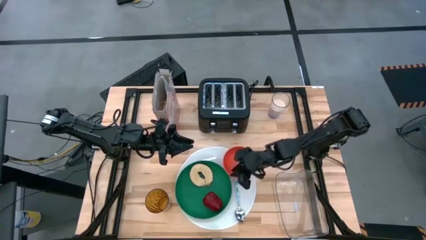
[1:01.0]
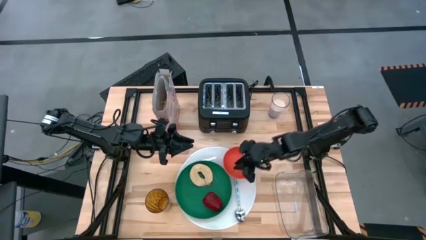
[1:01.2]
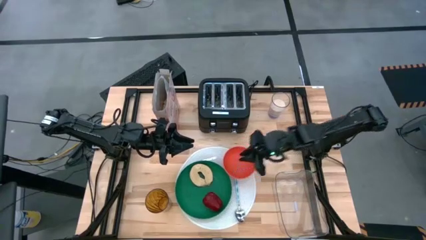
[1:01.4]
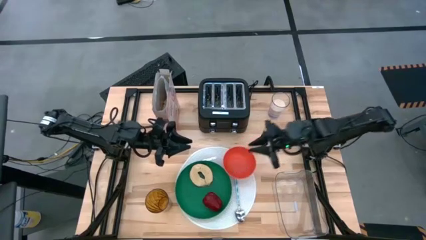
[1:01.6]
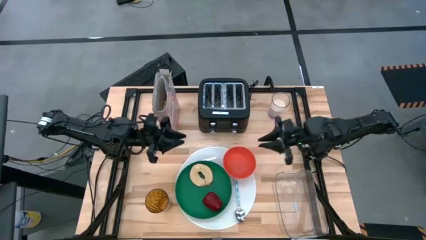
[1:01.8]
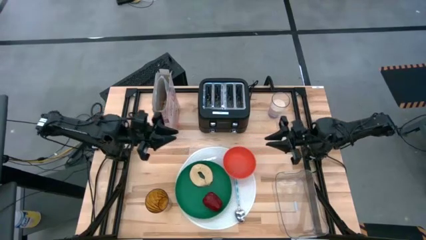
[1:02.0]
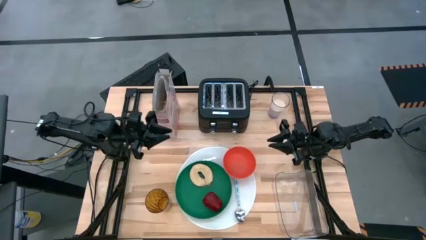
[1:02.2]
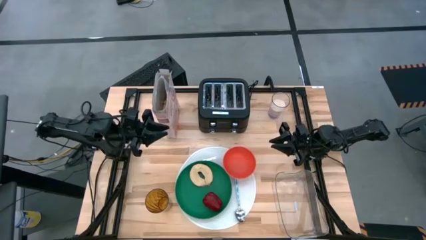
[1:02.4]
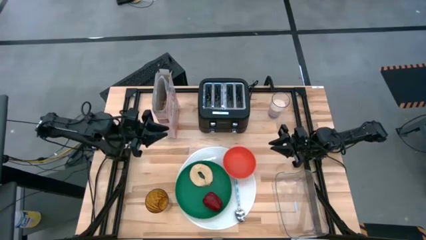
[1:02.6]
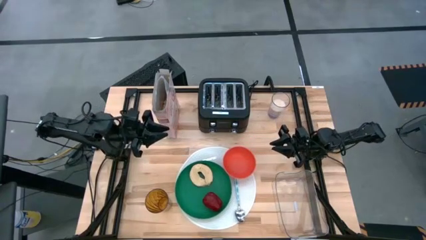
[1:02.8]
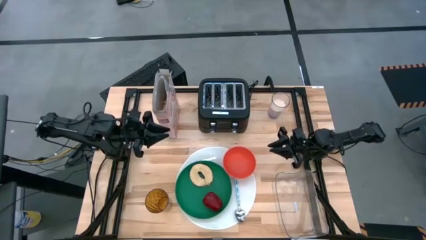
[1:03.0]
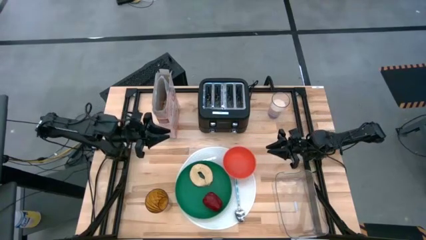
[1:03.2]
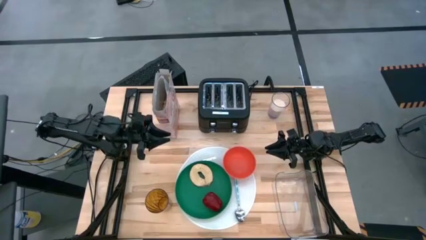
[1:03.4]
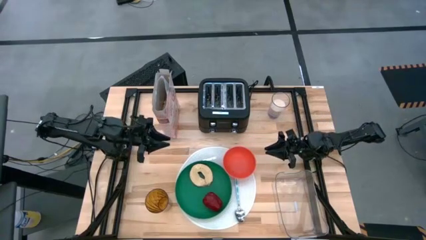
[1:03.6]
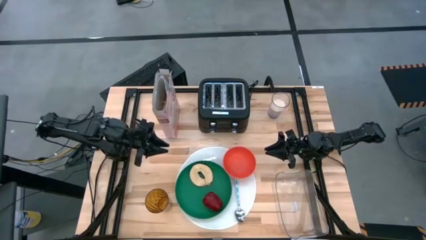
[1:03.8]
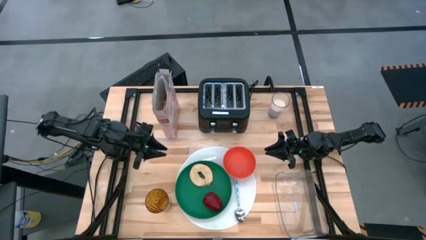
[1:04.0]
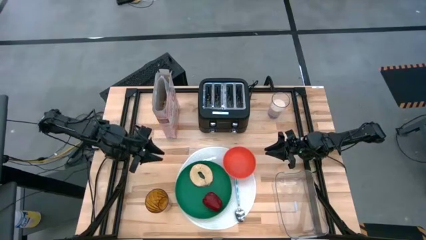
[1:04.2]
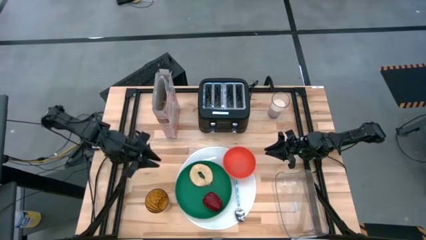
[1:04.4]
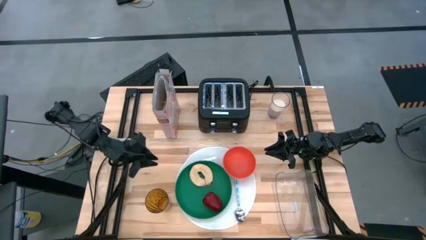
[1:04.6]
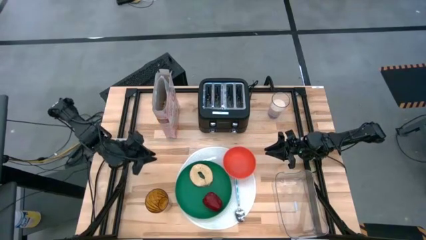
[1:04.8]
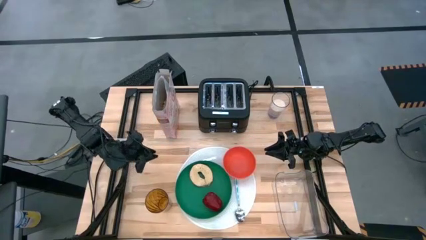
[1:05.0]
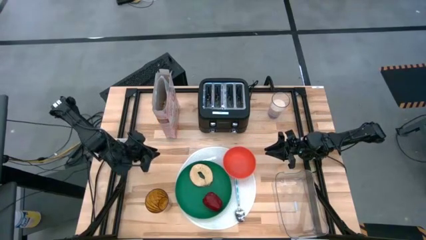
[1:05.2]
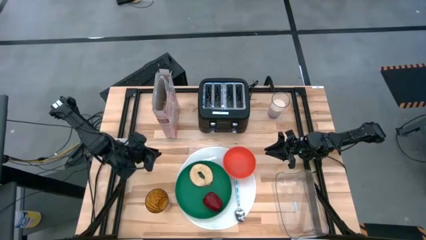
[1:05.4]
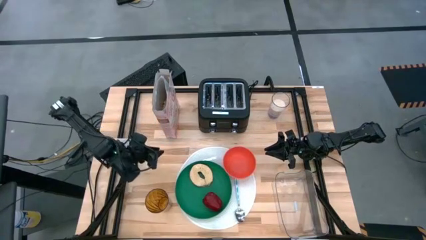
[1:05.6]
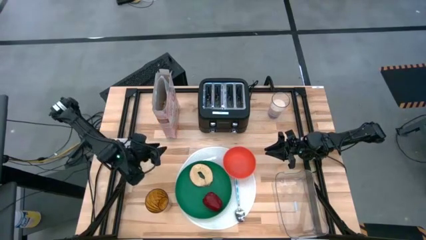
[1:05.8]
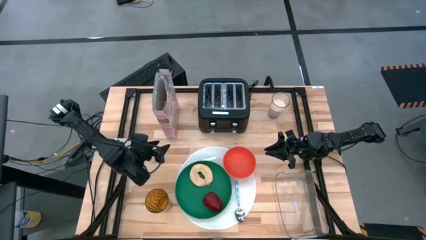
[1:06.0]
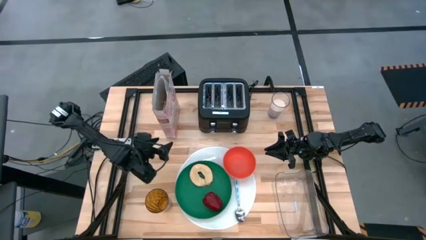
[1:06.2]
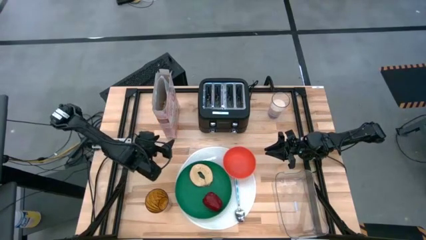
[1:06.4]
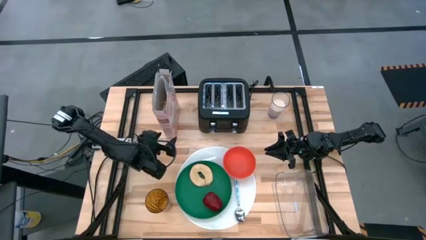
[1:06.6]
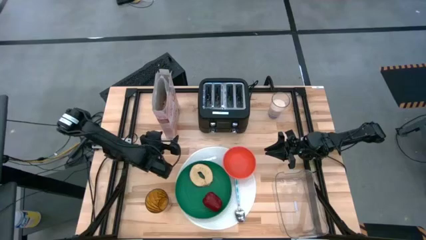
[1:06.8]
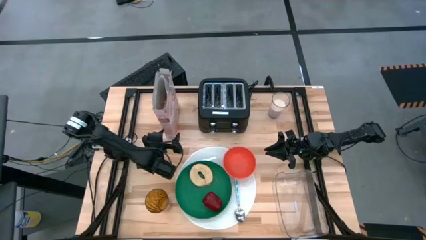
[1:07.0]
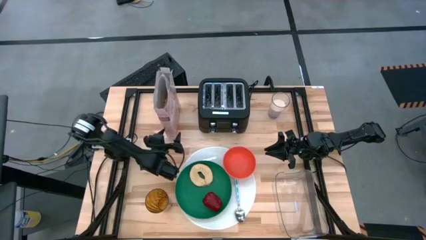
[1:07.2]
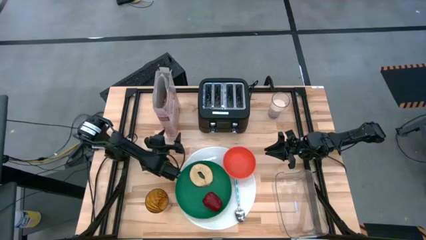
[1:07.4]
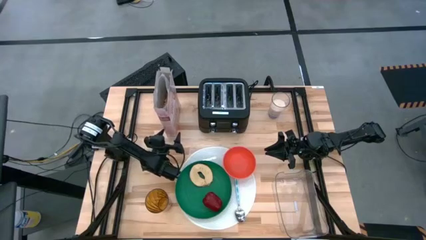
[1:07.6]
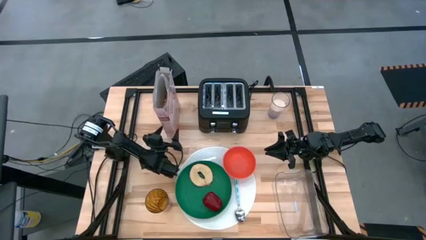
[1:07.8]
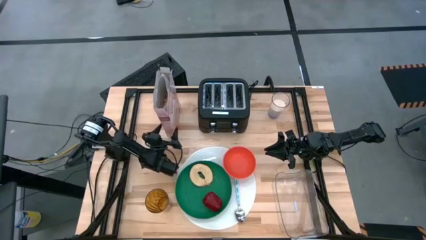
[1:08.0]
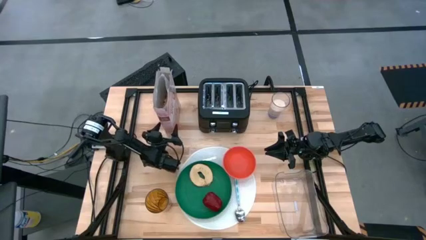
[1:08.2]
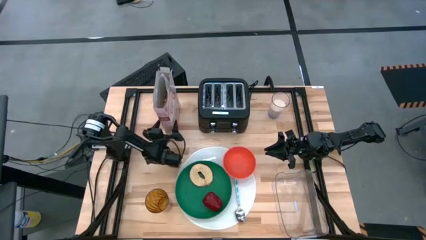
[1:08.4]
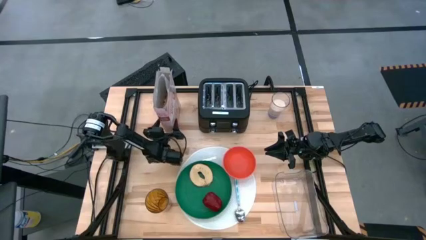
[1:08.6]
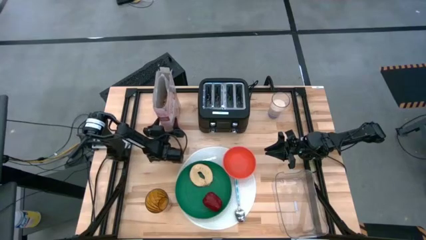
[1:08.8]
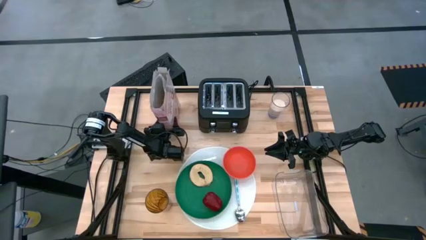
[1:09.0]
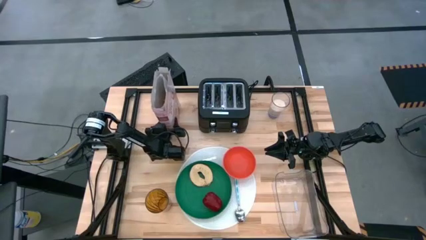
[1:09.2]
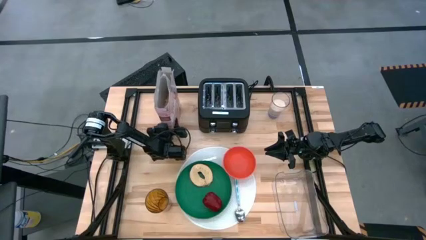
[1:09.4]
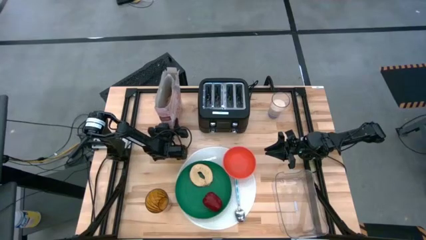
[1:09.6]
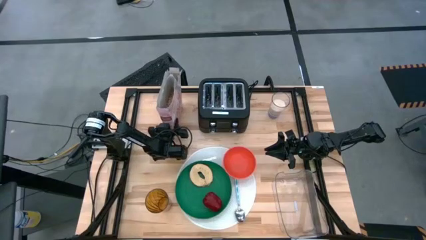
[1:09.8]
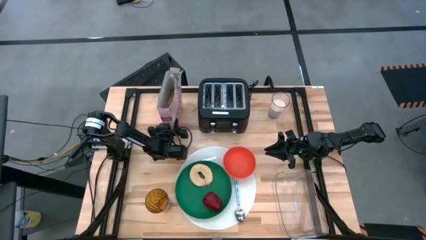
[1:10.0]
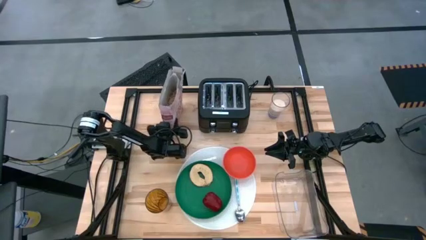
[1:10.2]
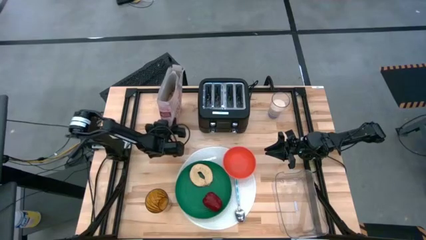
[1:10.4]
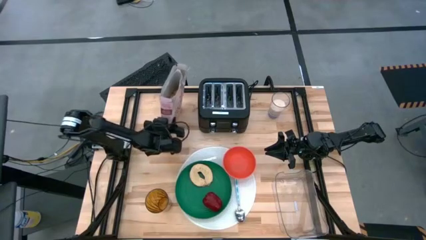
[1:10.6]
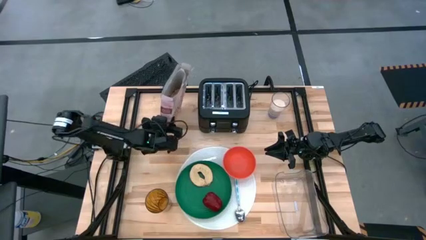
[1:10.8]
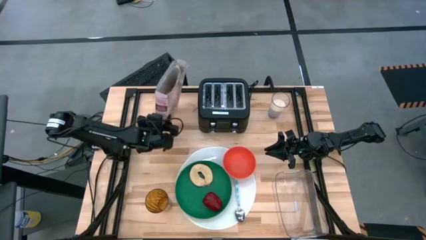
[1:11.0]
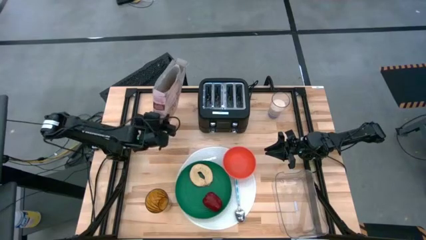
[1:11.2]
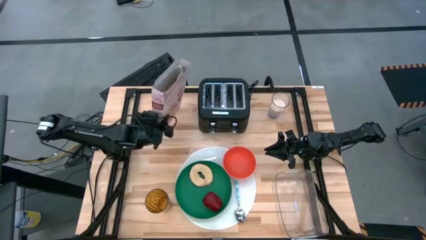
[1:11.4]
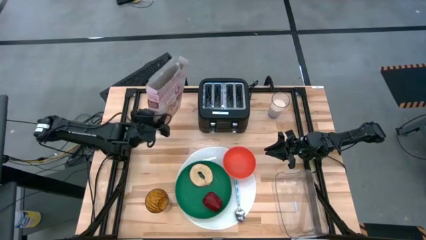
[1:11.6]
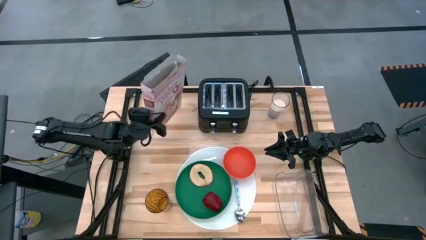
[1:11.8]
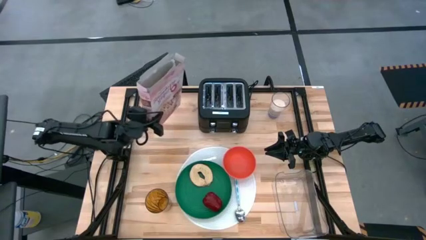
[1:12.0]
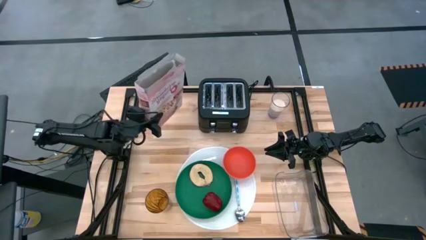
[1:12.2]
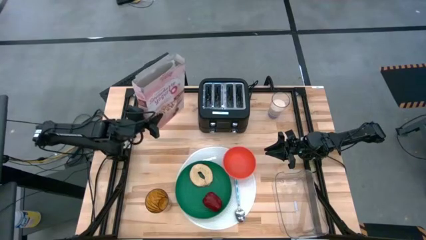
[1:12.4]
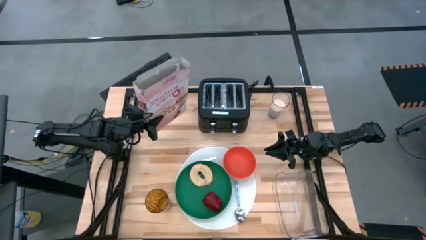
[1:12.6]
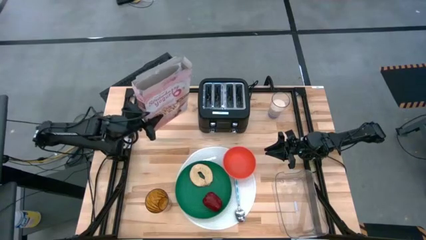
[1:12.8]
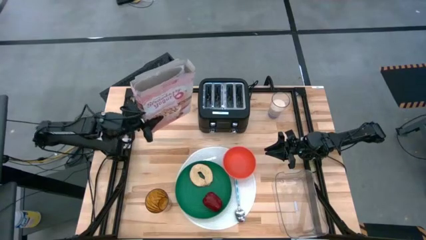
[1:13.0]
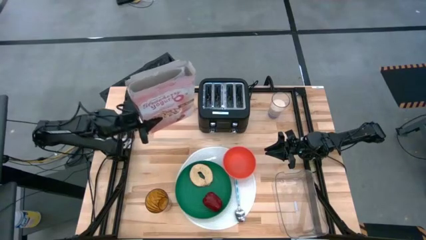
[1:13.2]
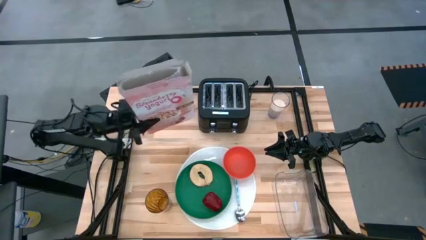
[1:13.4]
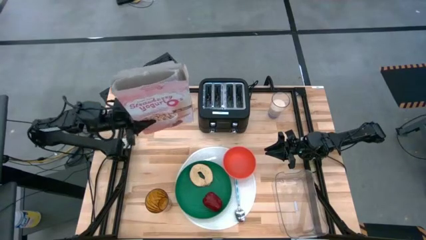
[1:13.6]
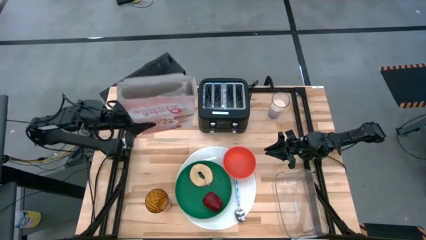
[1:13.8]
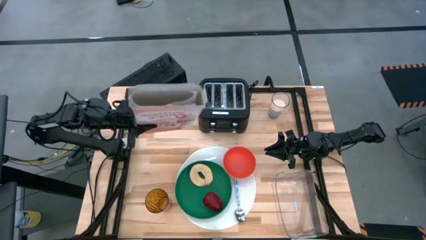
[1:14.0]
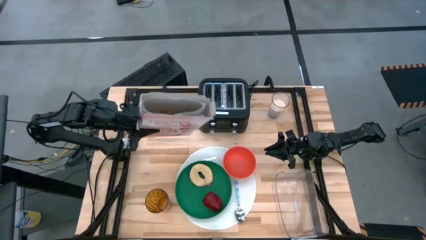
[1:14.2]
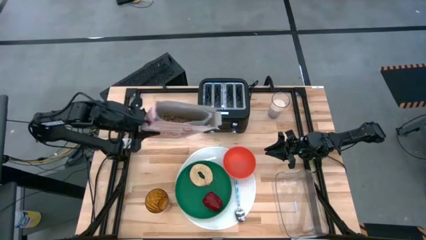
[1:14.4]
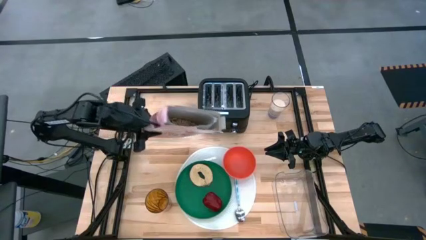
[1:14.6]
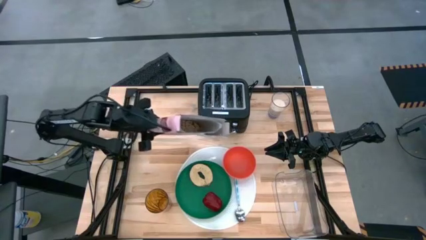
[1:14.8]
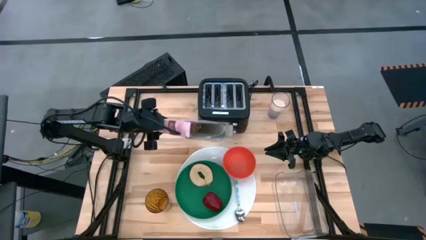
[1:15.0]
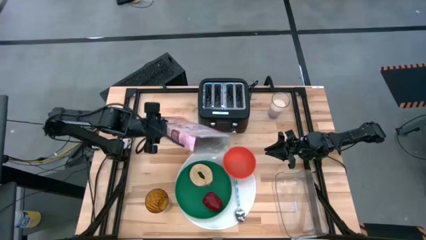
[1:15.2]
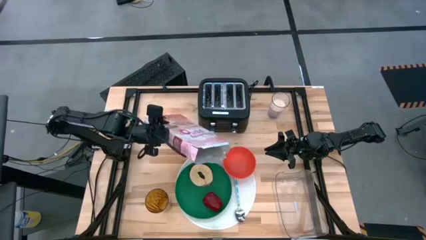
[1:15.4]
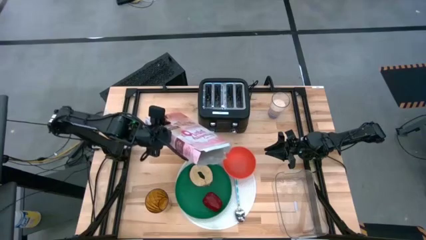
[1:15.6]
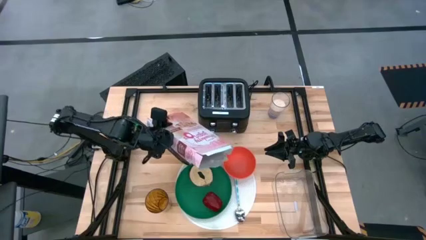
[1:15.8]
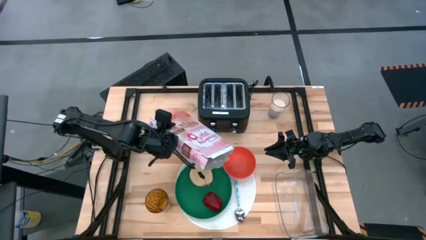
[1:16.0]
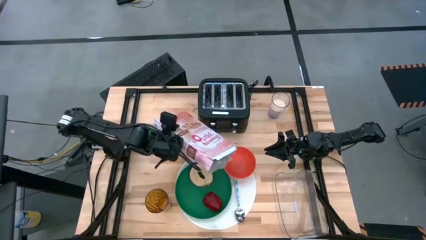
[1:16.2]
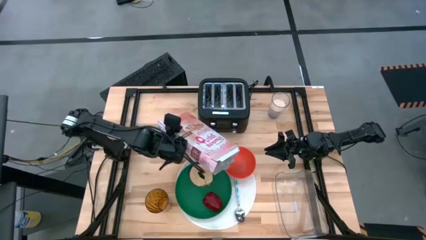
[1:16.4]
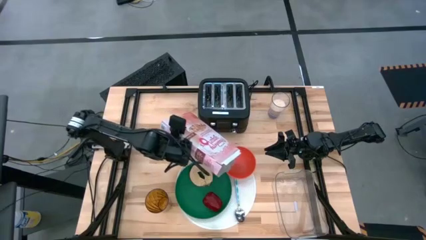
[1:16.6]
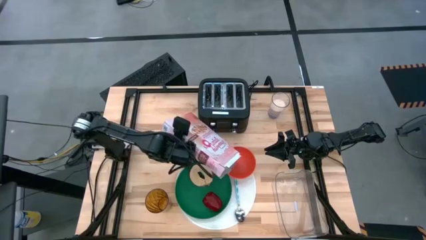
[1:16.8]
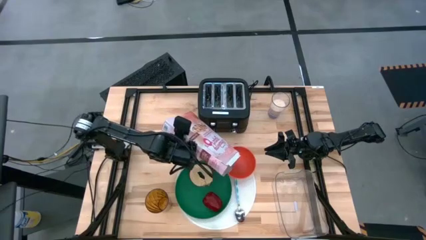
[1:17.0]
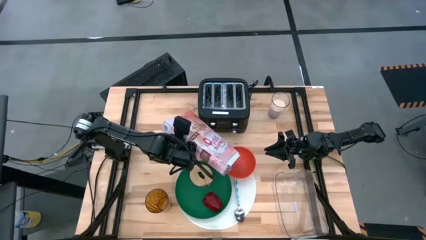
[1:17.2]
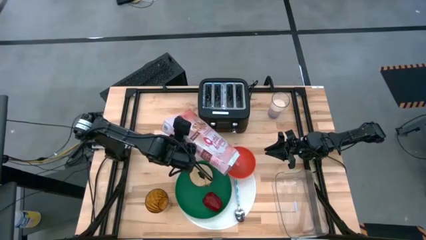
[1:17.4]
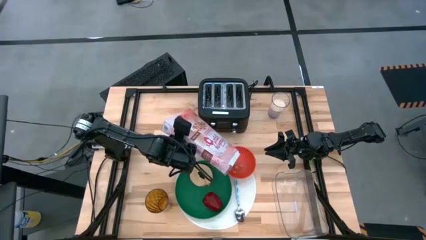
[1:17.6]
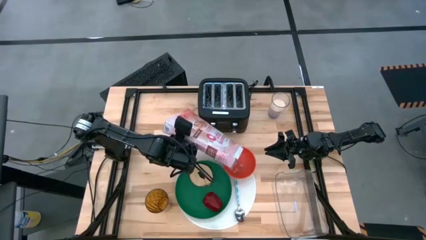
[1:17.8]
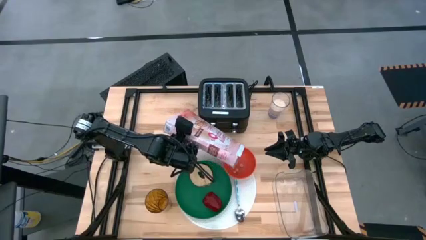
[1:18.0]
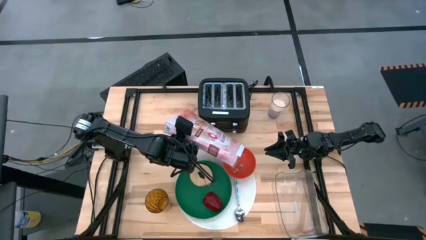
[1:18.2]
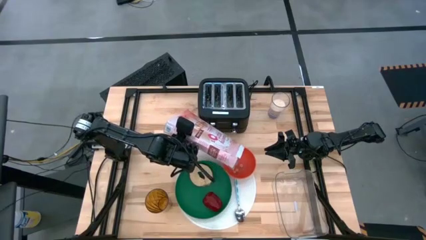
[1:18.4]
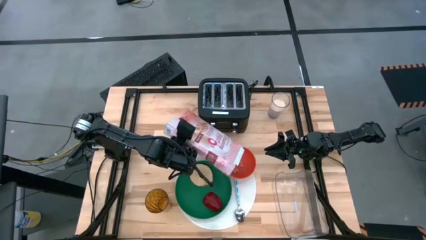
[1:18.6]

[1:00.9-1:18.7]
Task: Arrange a breakfast setting
Pour the cereal from the cereal box into the orange bowl
